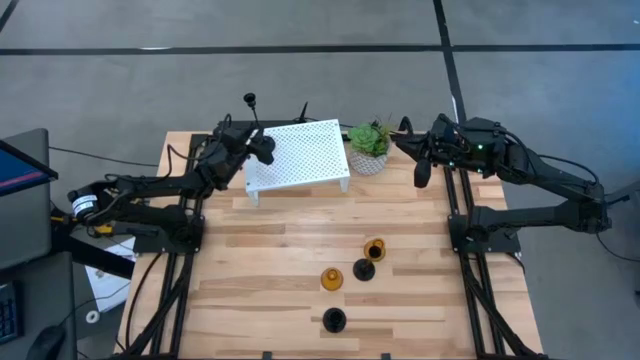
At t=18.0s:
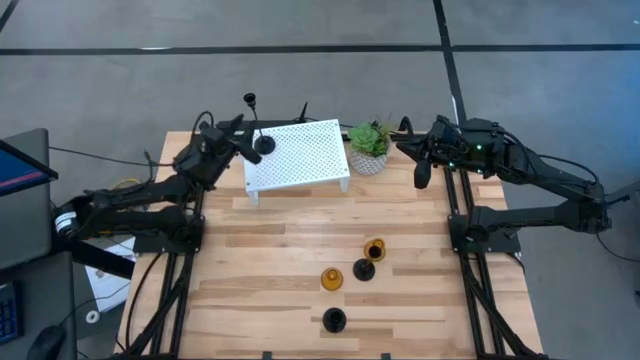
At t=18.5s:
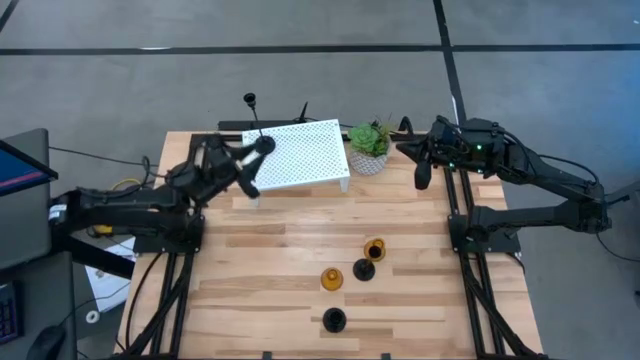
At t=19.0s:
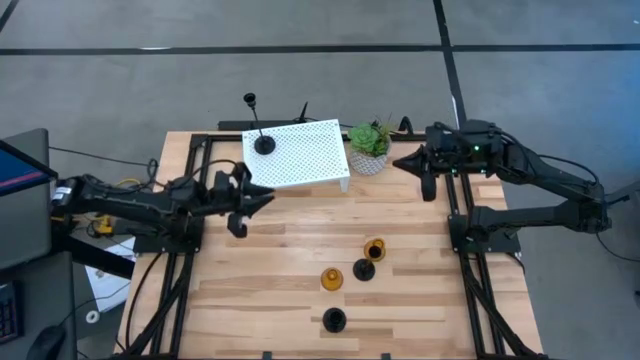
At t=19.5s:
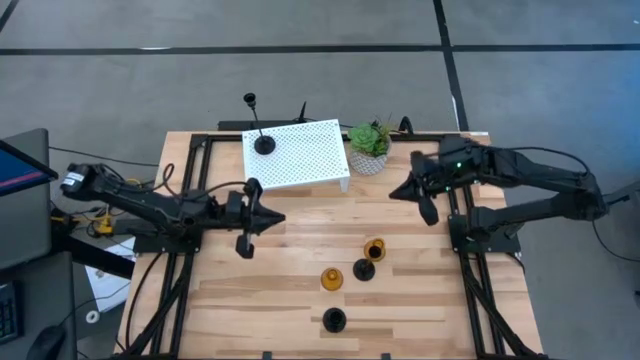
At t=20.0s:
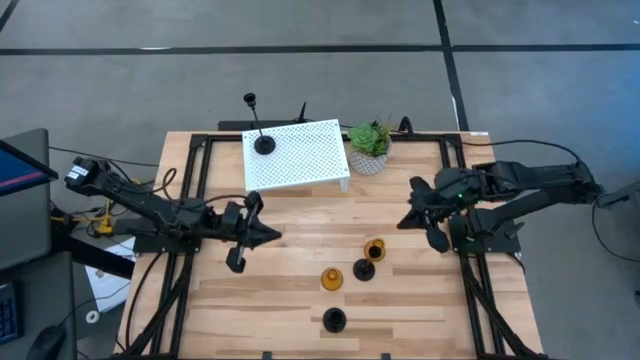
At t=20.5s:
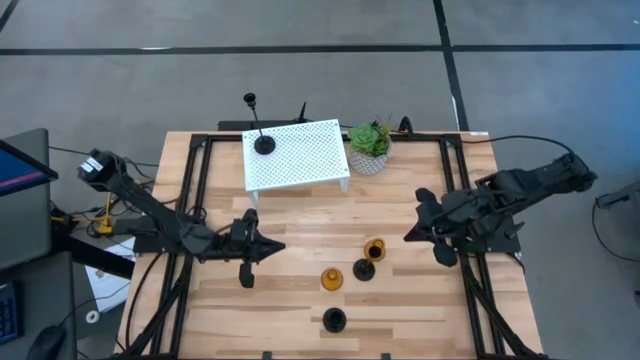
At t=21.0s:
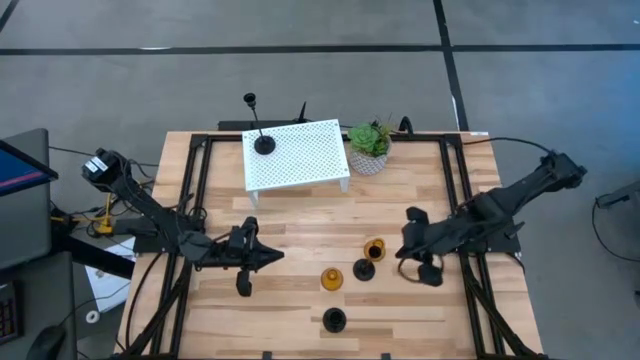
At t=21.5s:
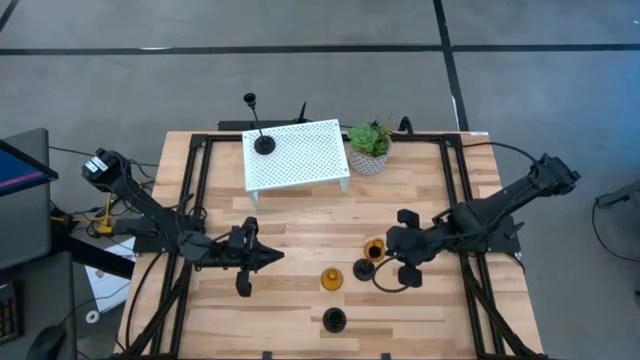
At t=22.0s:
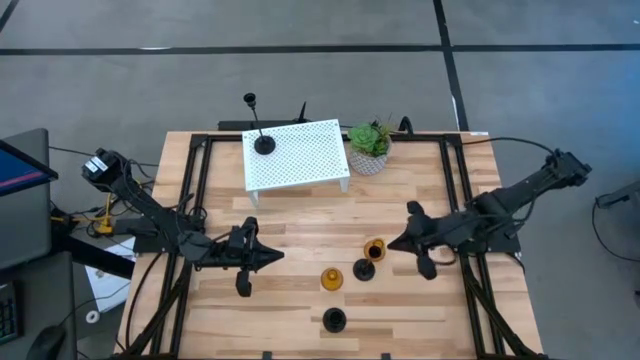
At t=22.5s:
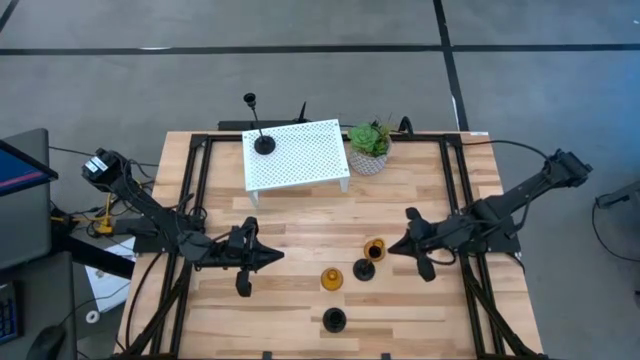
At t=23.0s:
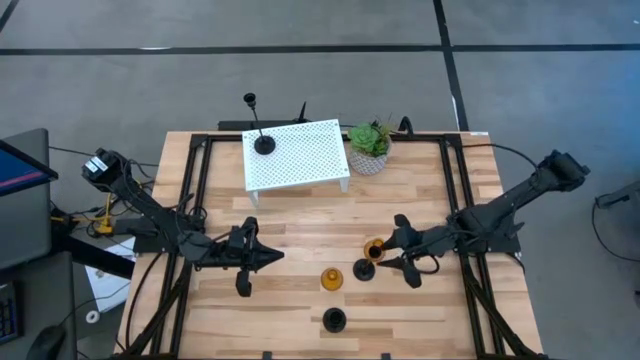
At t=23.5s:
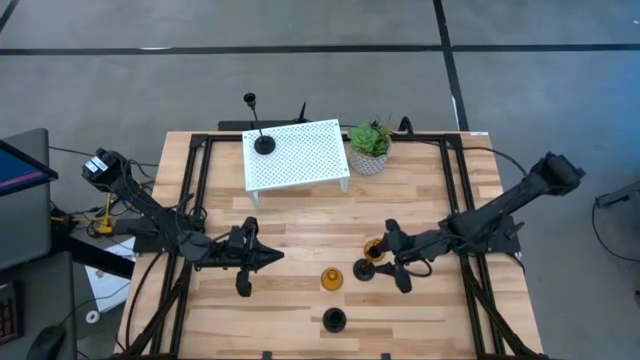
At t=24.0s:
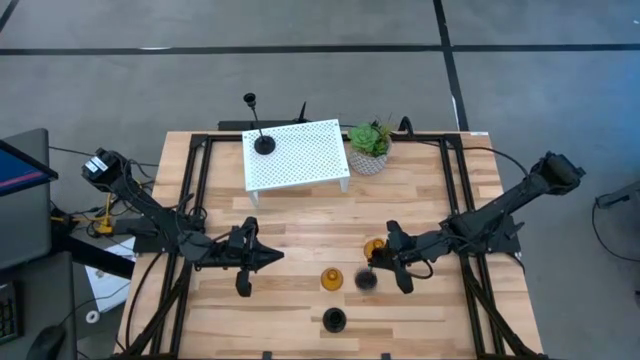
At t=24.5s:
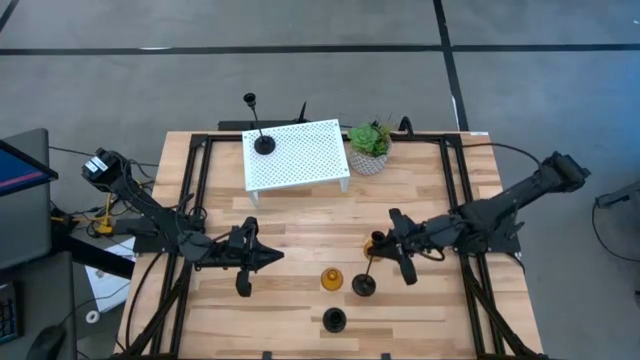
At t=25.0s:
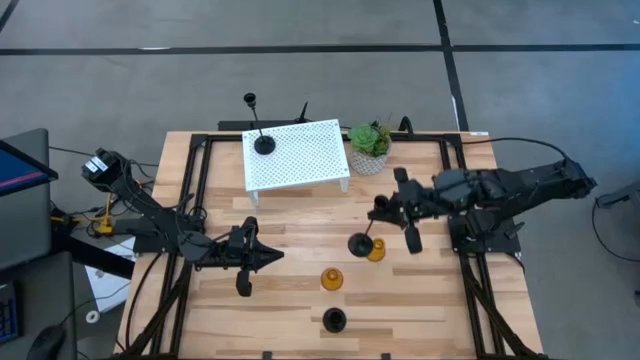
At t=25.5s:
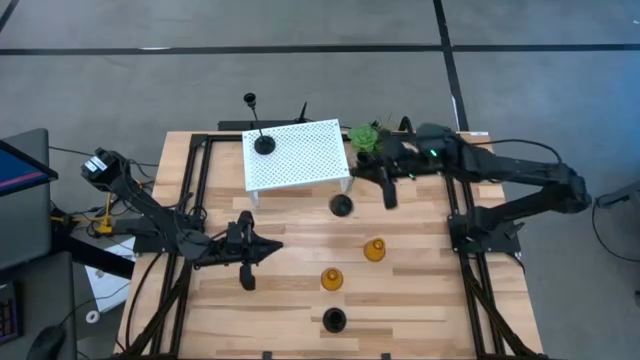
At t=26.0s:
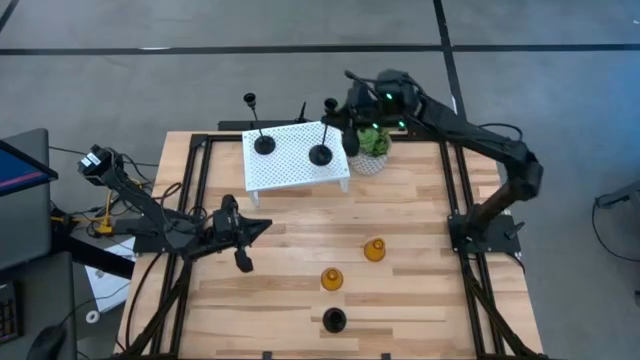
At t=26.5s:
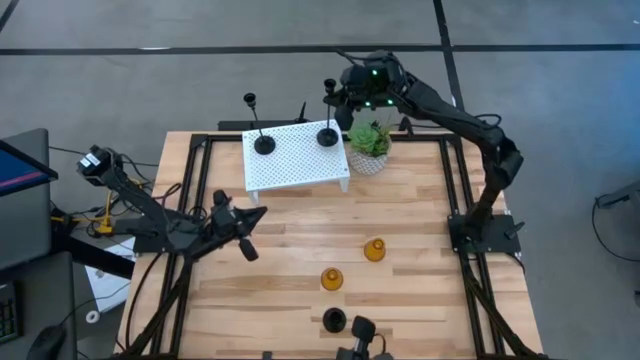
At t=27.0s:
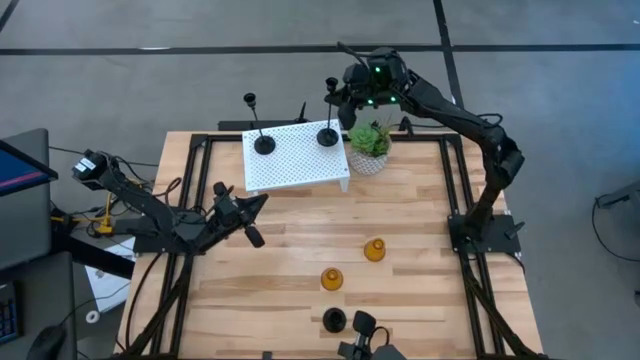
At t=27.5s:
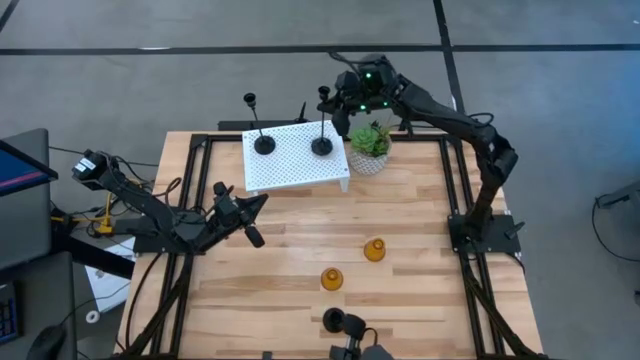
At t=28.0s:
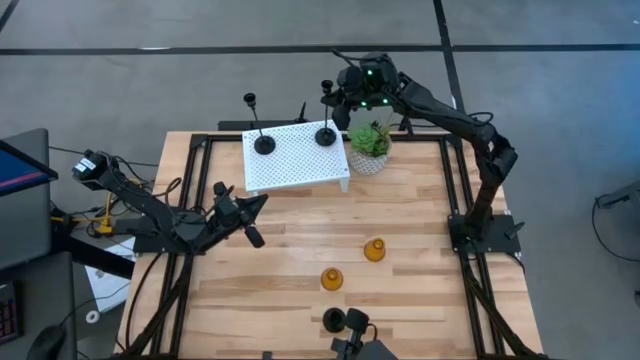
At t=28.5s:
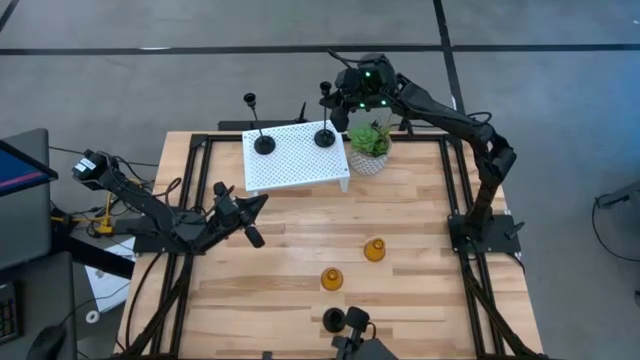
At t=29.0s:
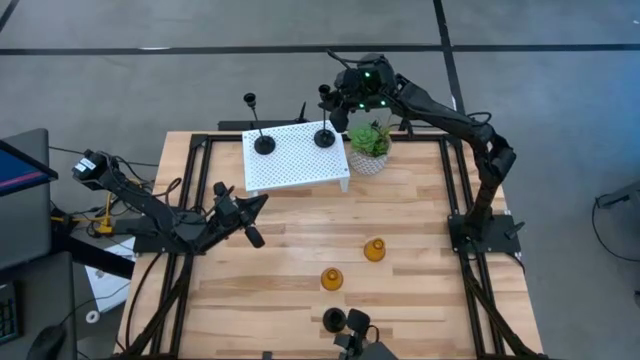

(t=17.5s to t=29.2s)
Task: Pick & Place candle stick holders
Put the top black candle holder on the shelf

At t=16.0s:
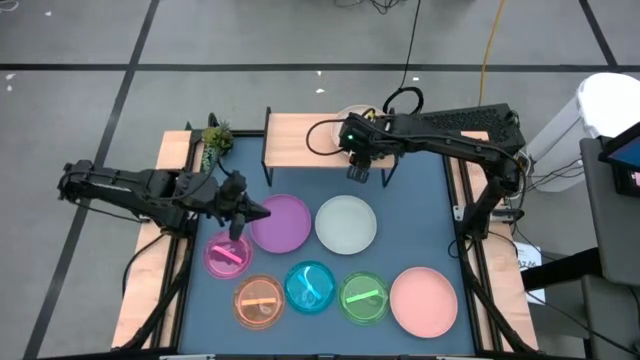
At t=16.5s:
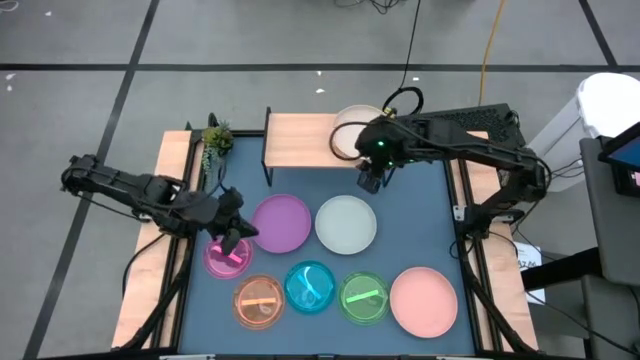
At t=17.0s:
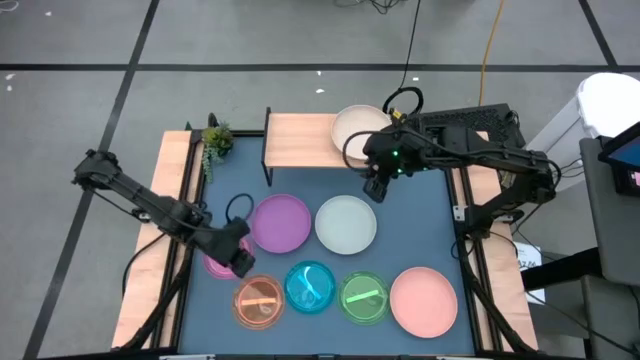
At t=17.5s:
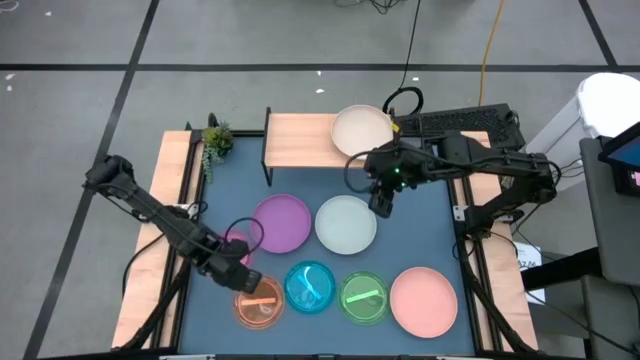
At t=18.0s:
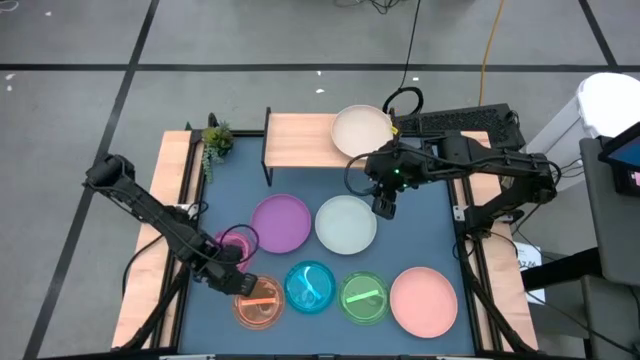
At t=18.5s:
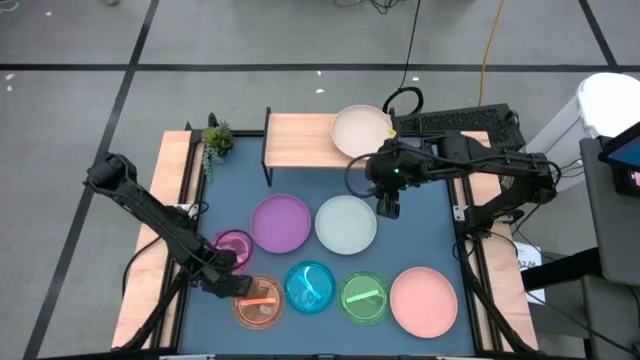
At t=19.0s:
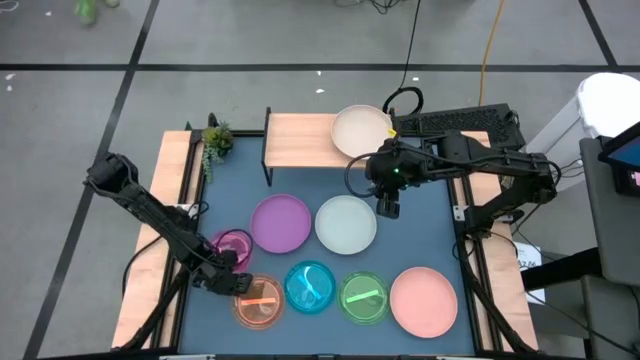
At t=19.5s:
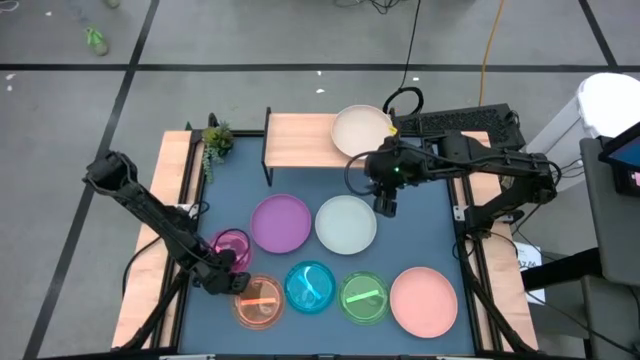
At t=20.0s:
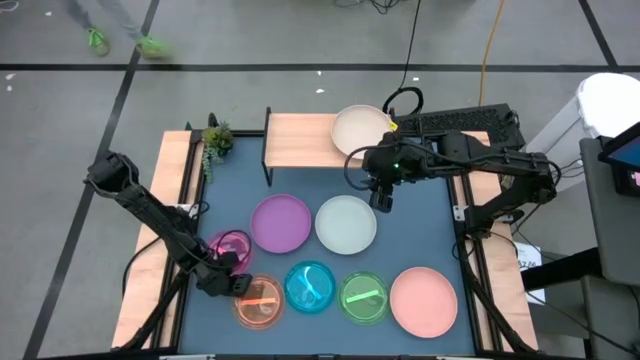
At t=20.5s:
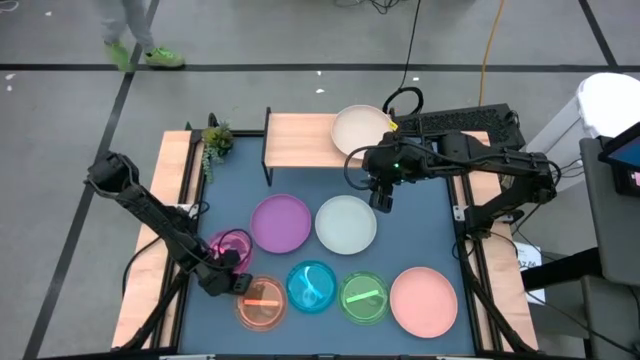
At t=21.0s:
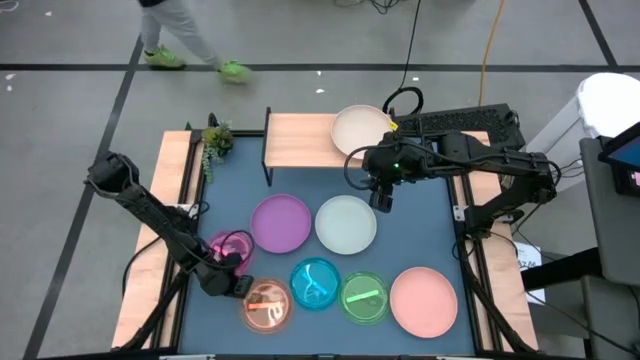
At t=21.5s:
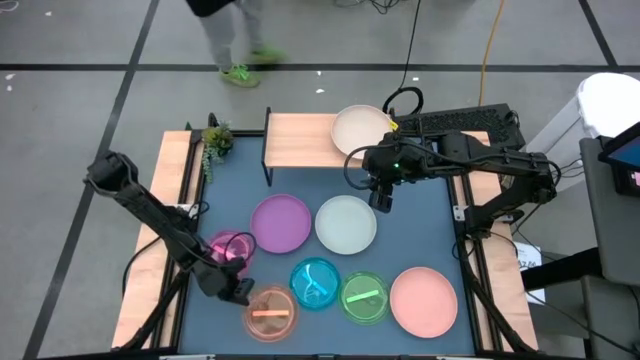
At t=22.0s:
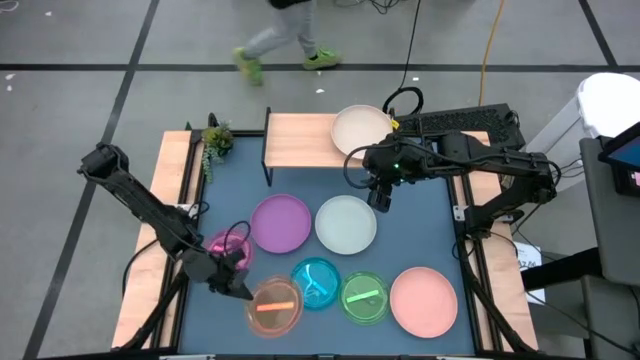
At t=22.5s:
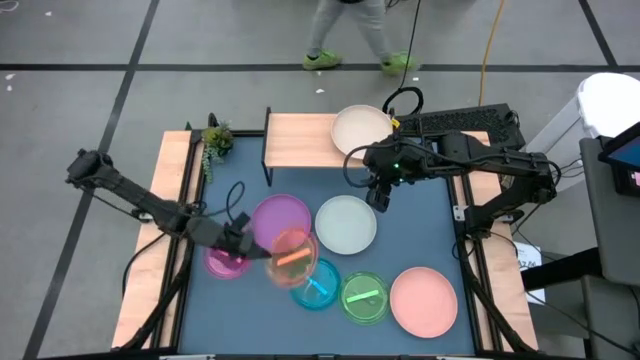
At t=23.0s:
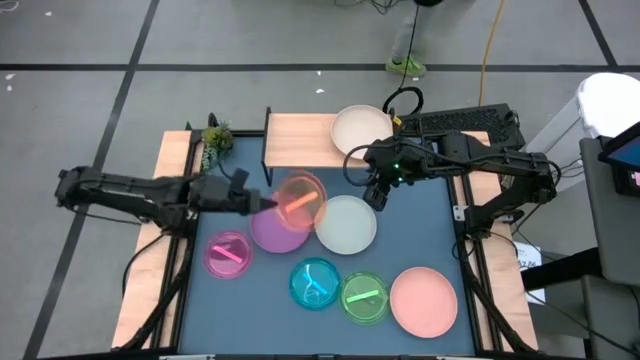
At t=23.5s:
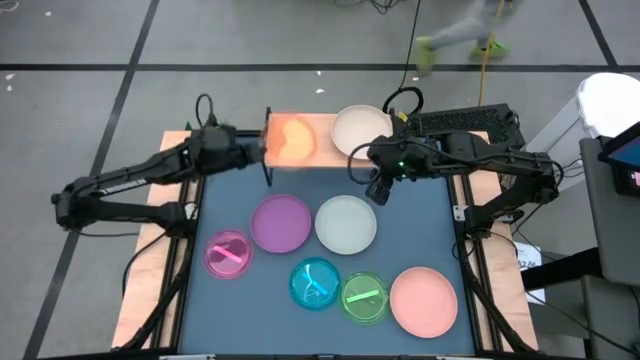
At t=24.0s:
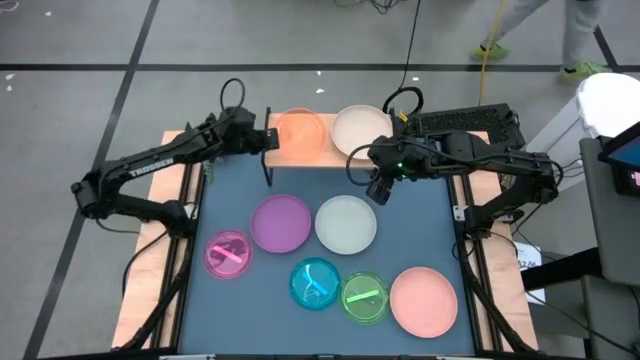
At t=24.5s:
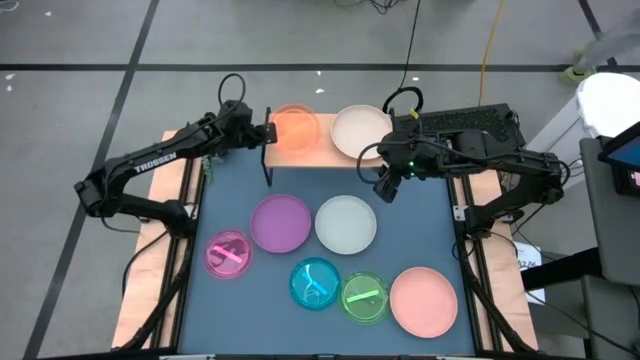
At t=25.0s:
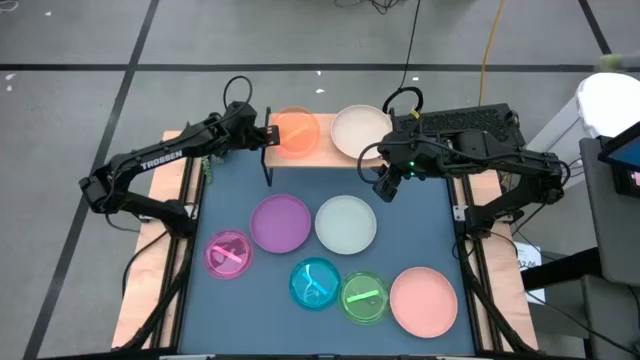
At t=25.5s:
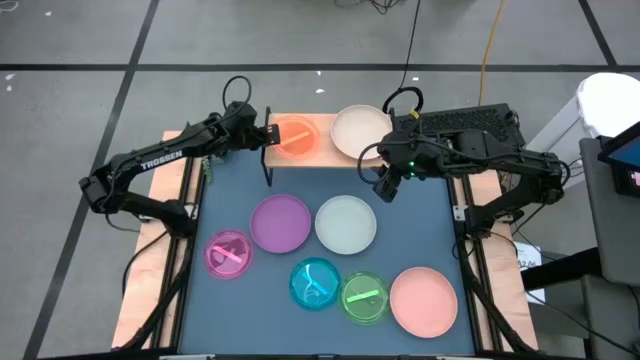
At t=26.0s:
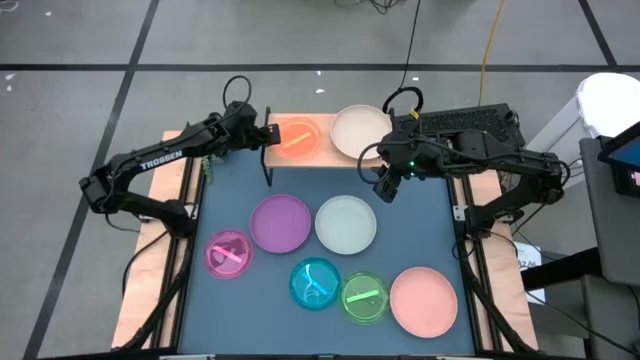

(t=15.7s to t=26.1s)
Task: Place and stack plates onto a shelf
Put the orange plate on the shelf
